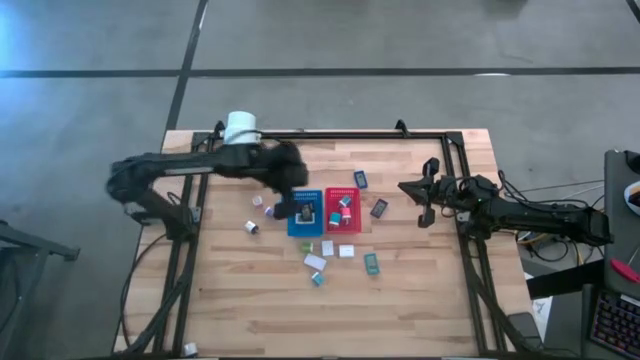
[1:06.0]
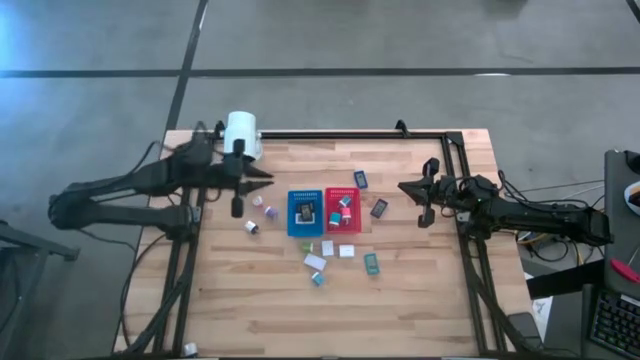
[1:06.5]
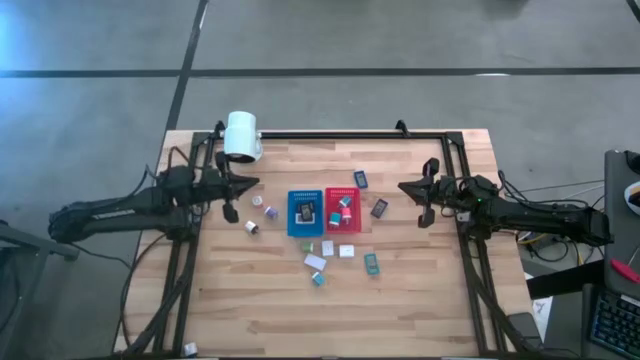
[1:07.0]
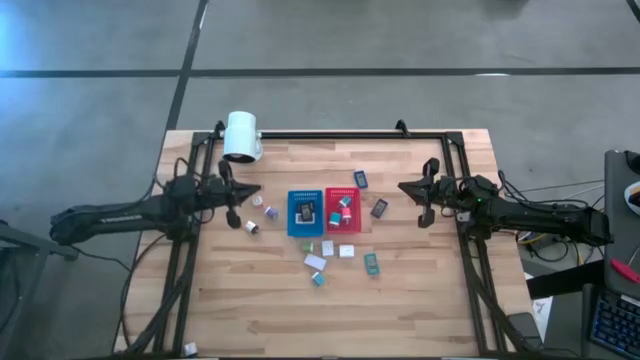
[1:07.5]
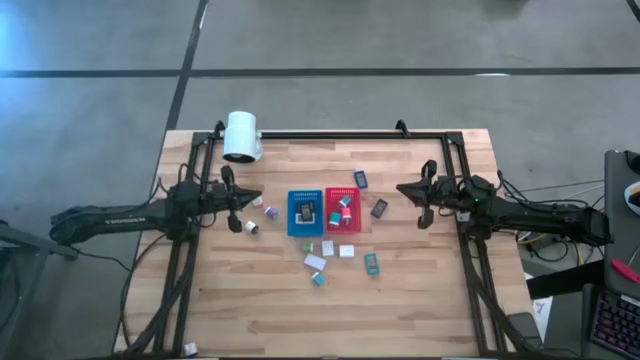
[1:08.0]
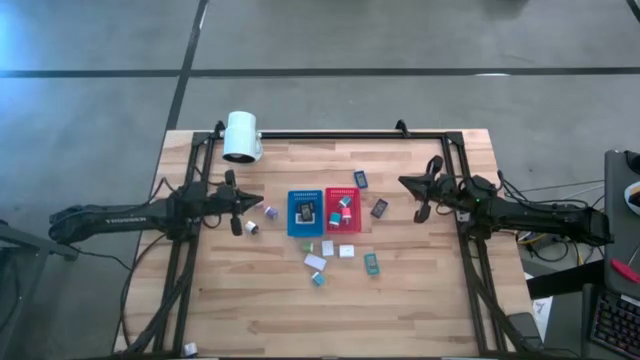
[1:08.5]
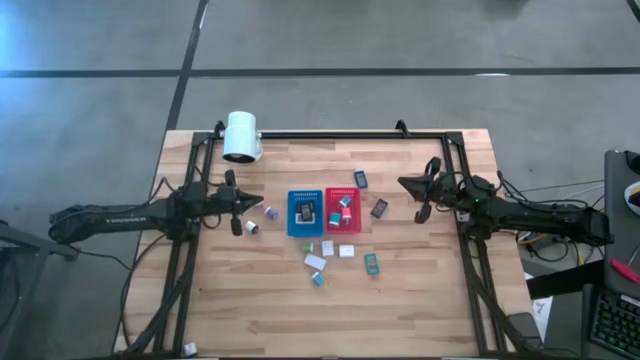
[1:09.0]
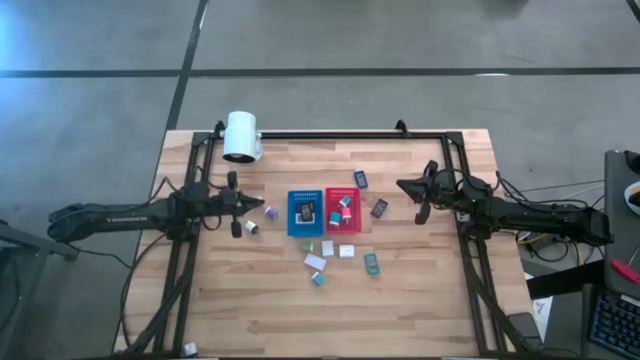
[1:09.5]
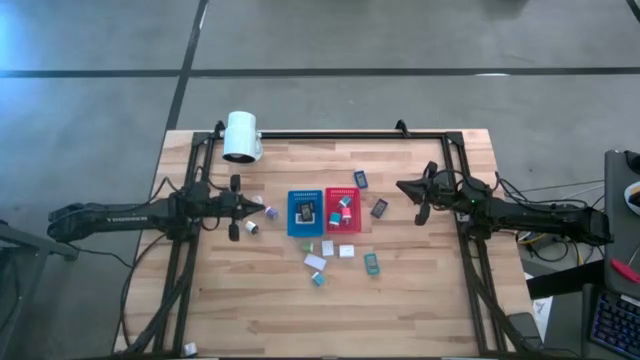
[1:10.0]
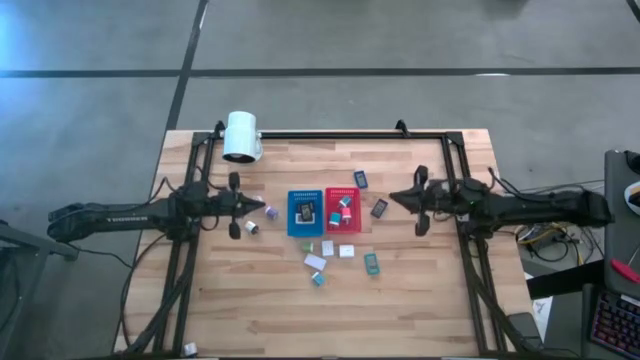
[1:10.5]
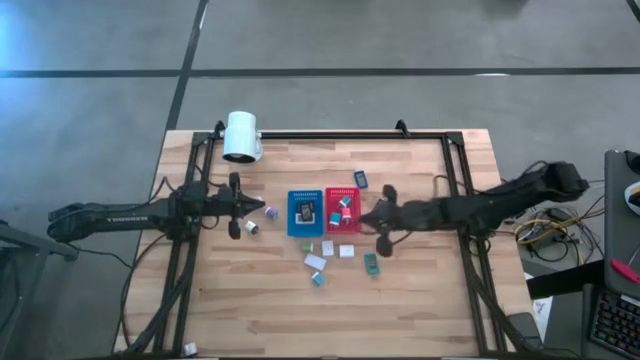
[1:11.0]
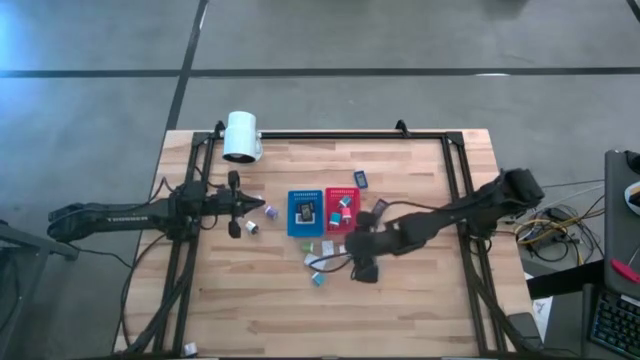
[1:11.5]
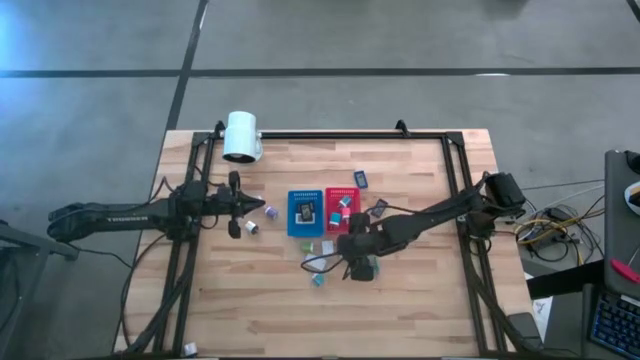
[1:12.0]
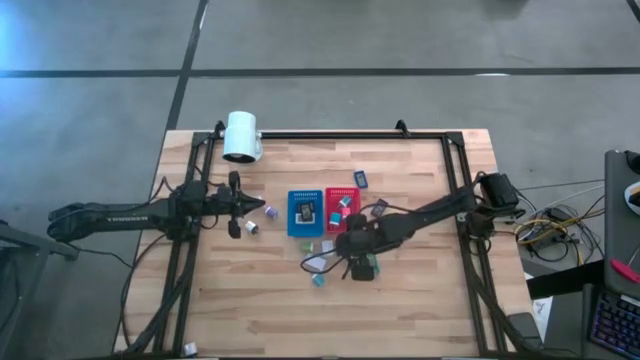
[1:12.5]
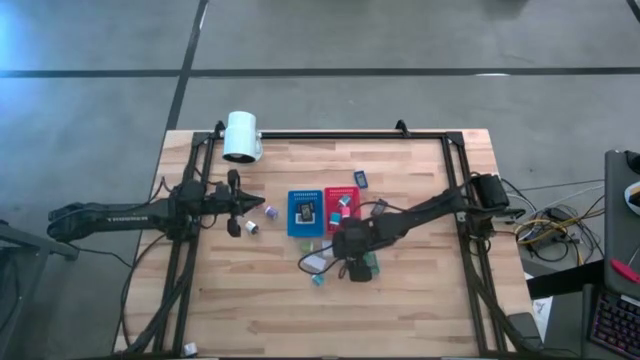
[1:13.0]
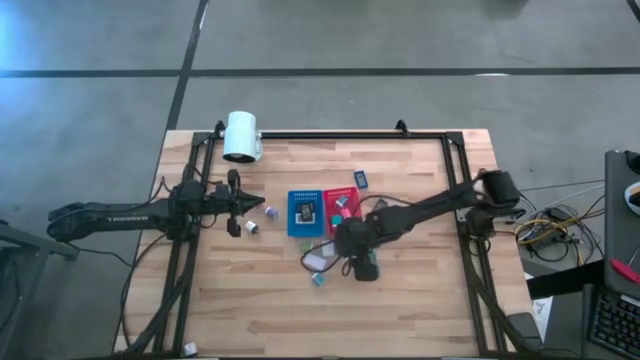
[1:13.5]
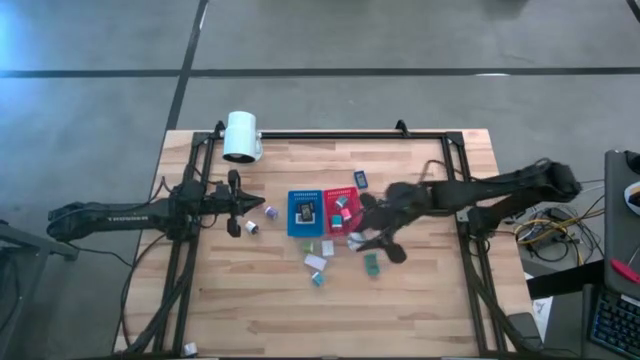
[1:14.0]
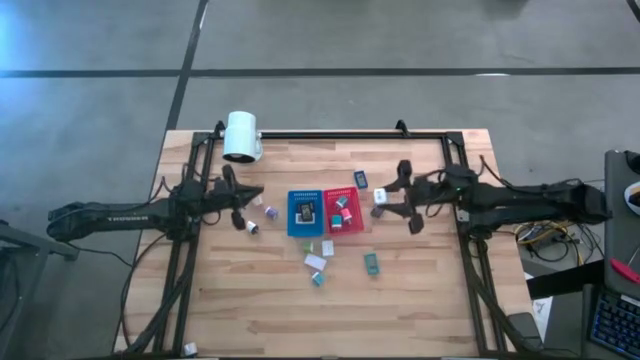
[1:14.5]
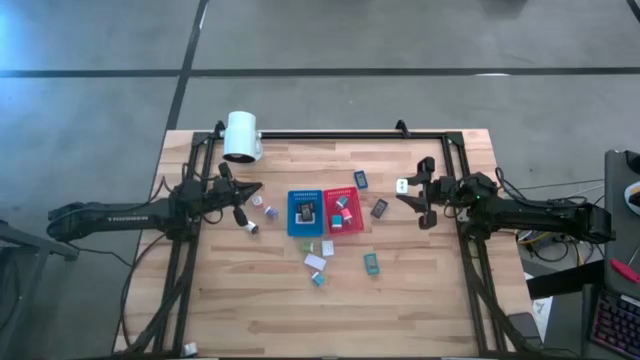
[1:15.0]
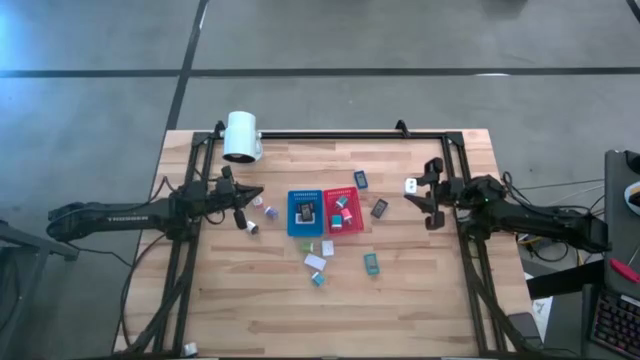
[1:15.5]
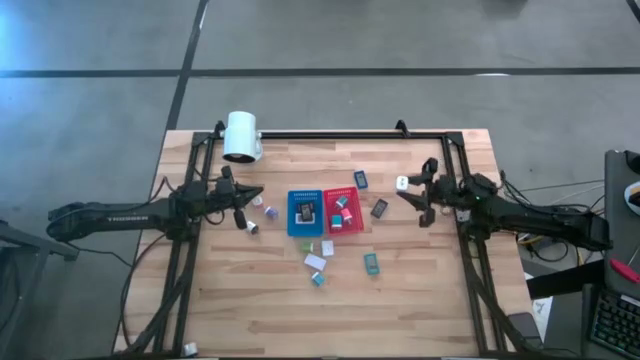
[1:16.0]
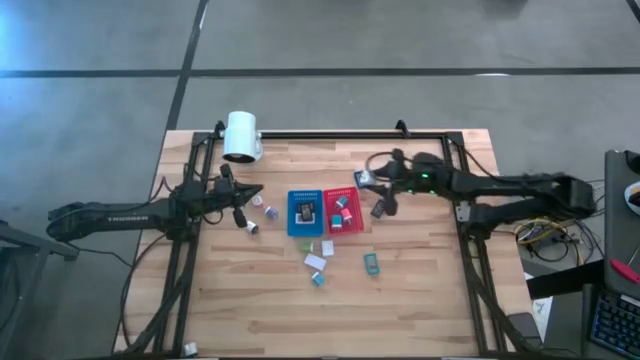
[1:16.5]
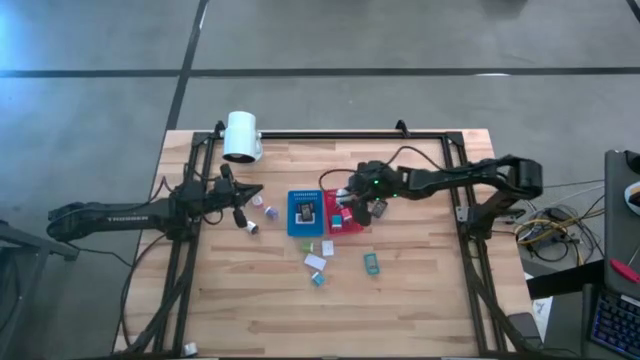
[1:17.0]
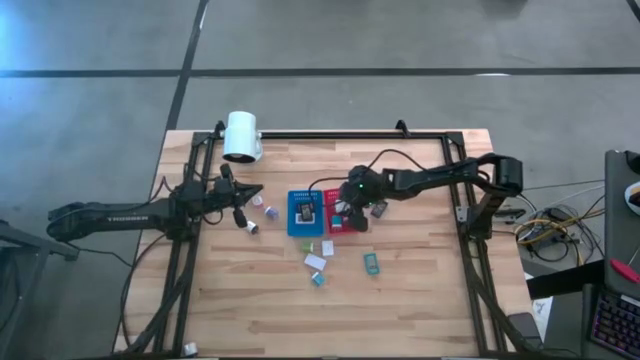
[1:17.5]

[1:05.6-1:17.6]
Task: Pick & Place Office items
Put the white charger adapter into the red bin

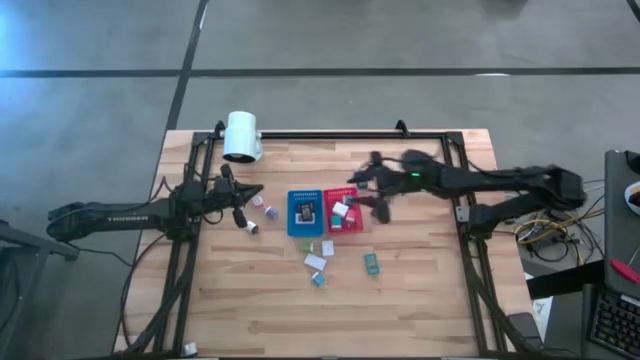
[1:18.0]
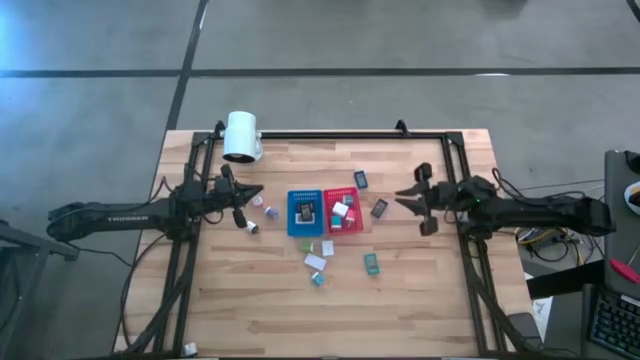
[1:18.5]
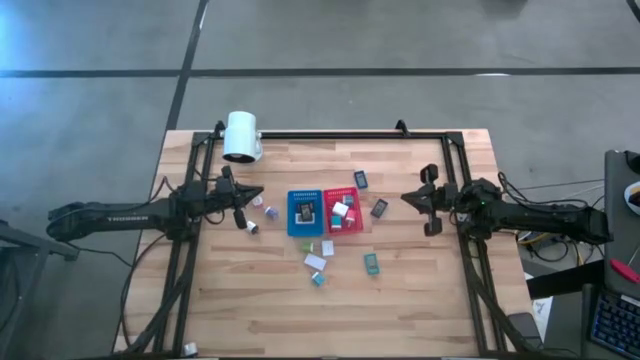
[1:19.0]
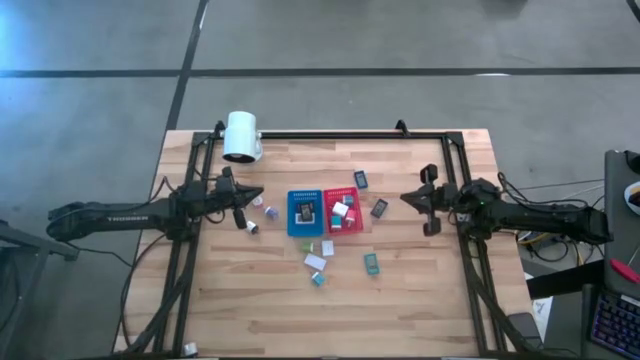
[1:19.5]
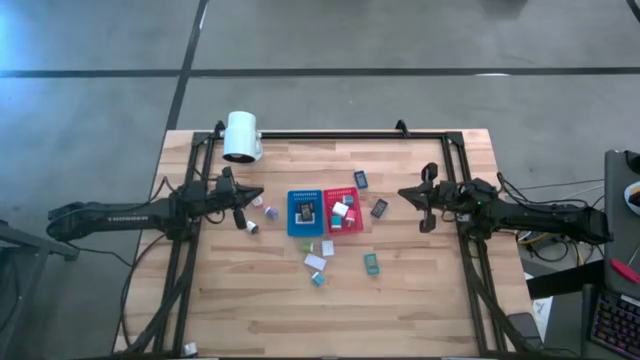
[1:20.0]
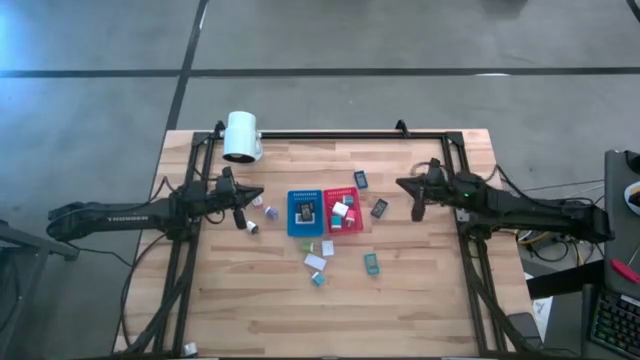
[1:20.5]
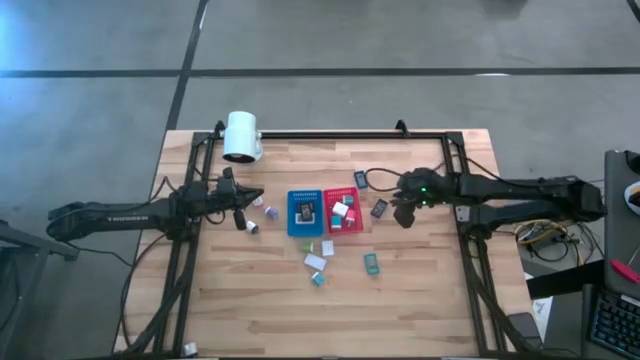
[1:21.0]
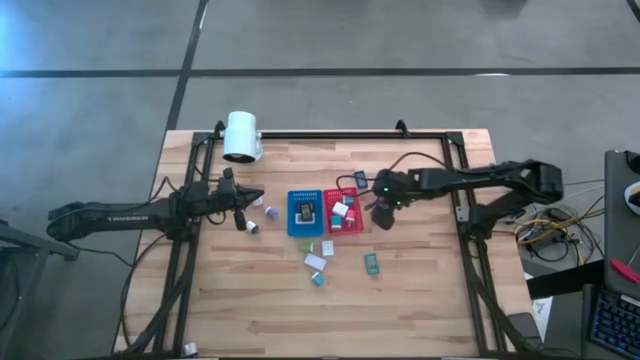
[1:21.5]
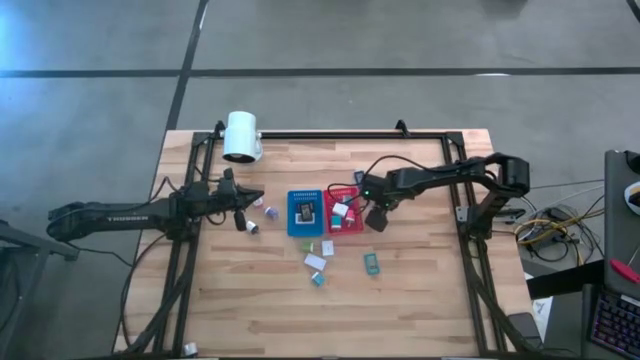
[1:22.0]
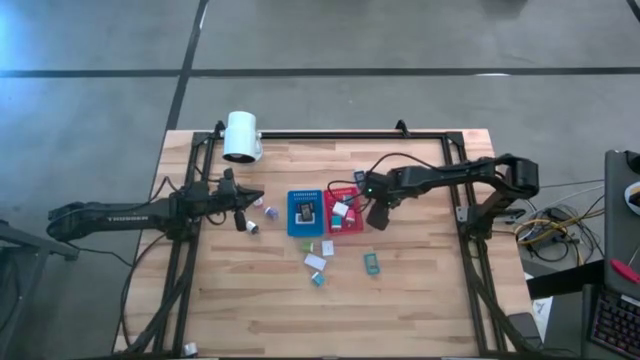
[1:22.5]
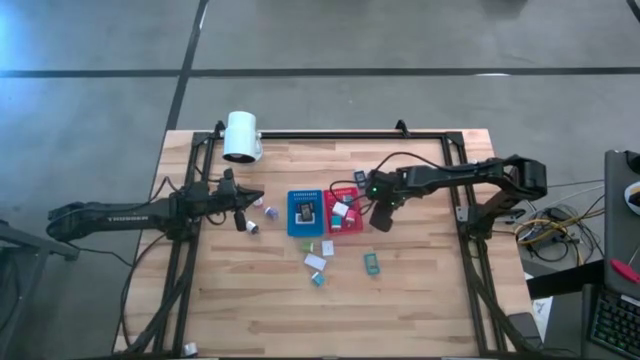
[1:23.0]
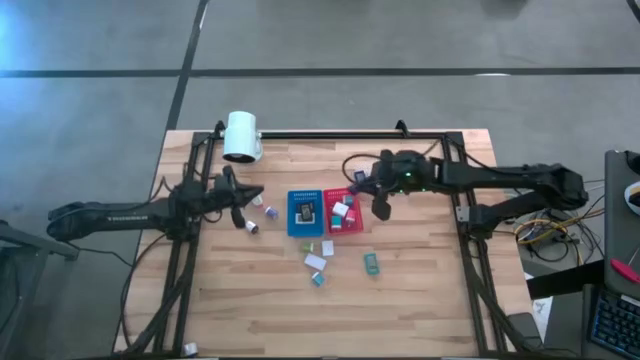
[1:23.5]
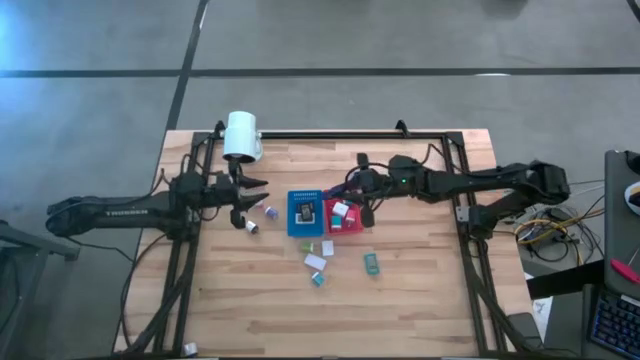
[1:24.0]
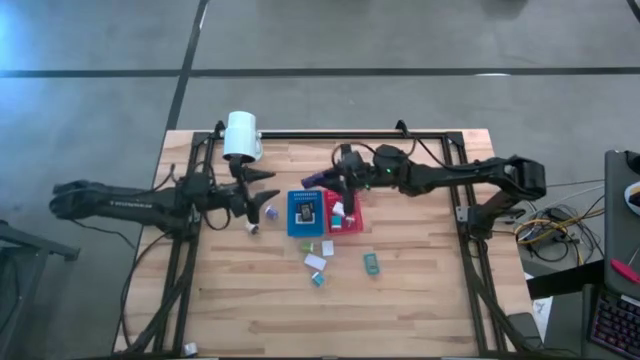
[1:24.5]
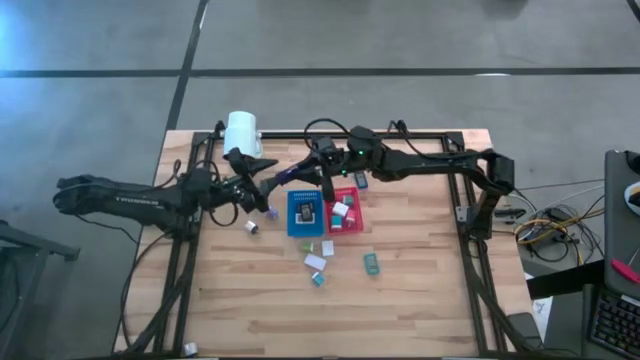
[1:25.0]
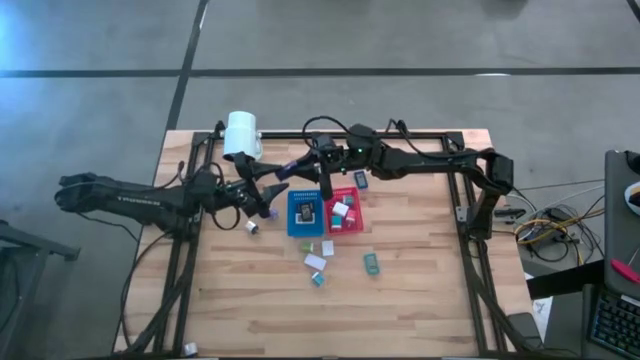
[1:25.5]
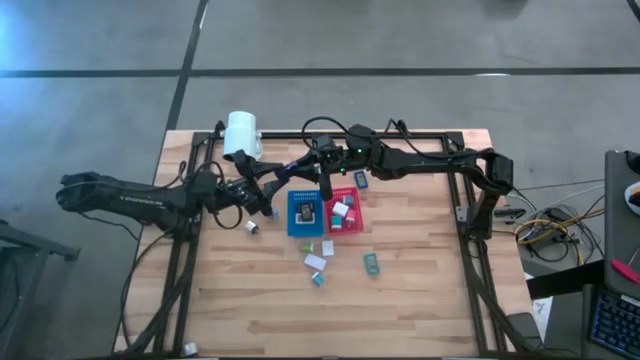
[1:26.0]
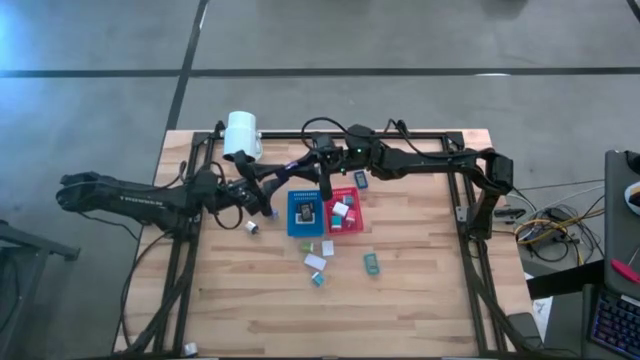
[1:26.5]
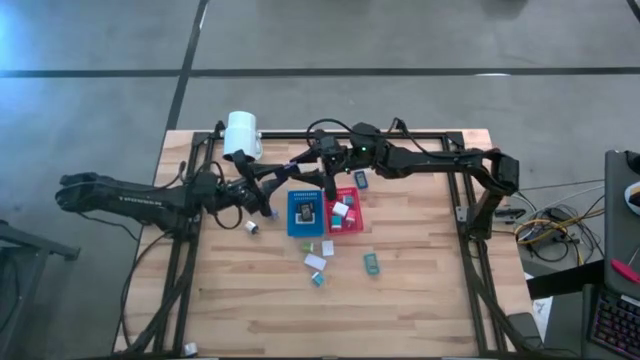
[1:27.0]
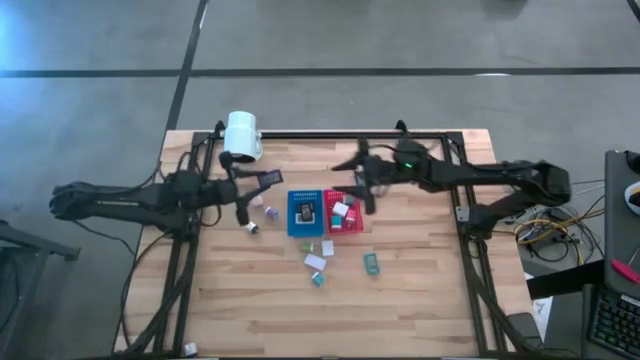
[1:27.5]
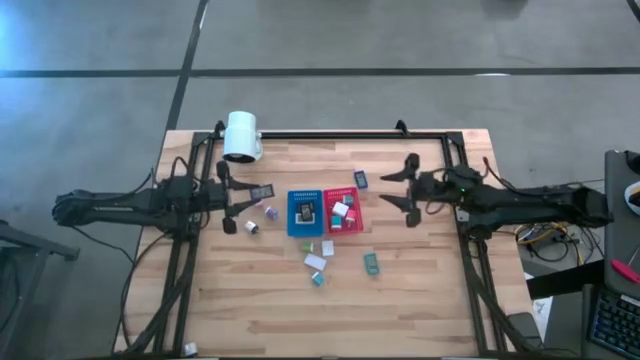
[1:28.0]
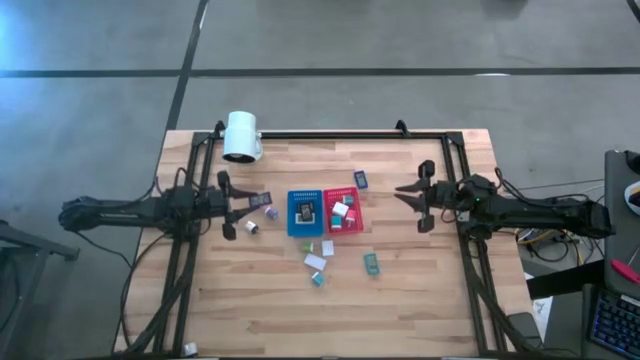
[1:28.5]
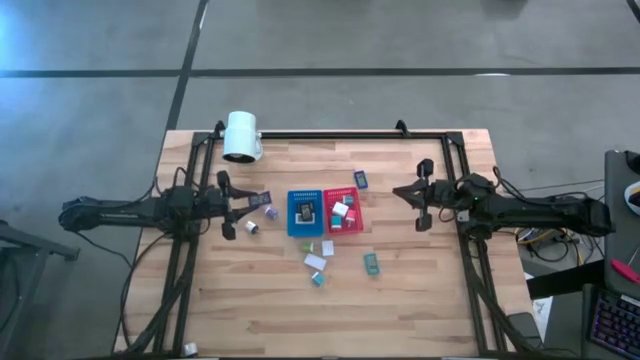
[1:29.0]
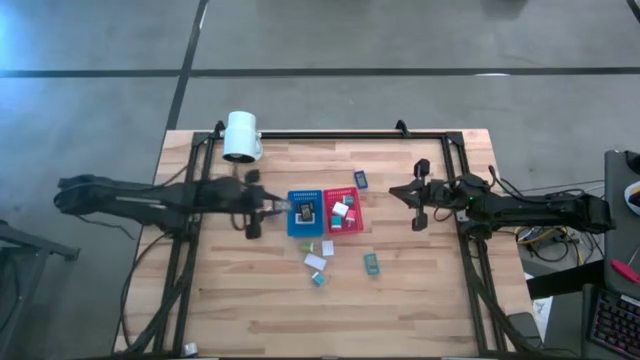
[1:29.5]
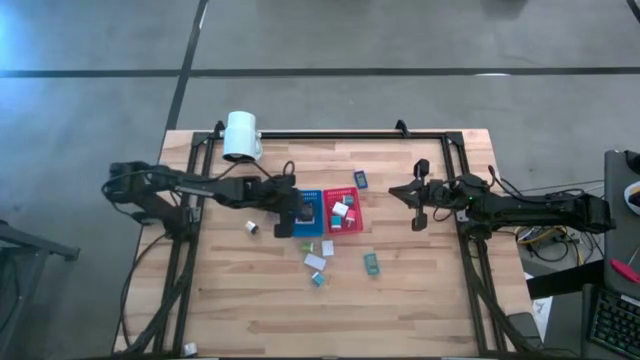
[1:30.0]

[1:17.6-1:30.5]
Put the blue digital timer into the blue bin
